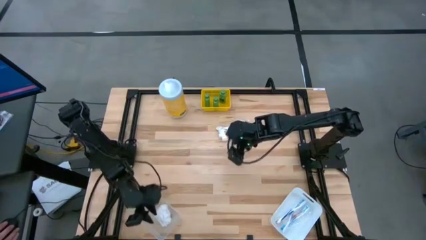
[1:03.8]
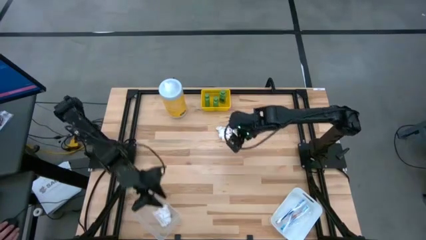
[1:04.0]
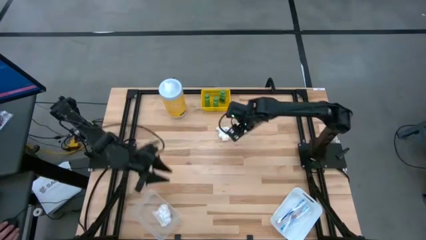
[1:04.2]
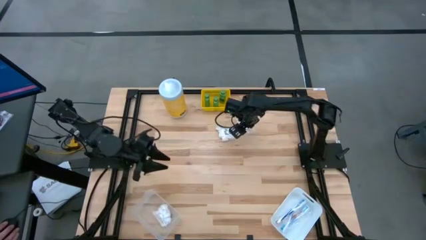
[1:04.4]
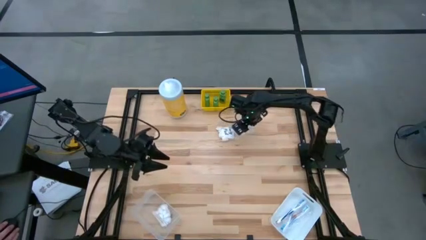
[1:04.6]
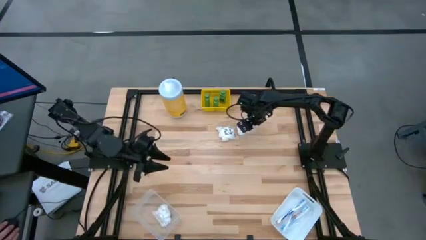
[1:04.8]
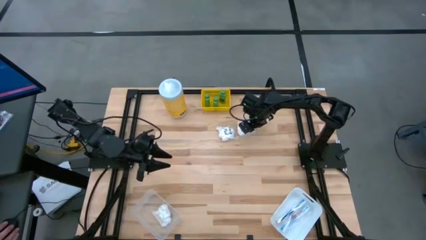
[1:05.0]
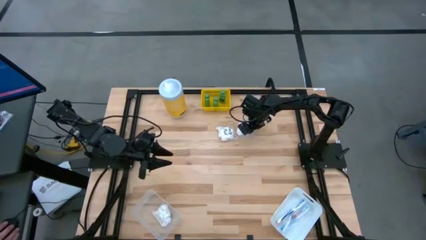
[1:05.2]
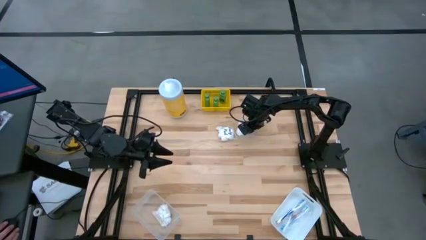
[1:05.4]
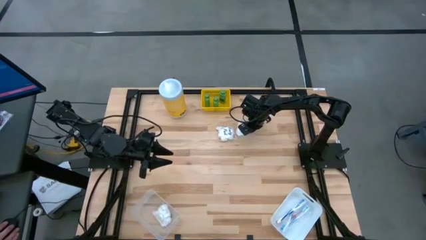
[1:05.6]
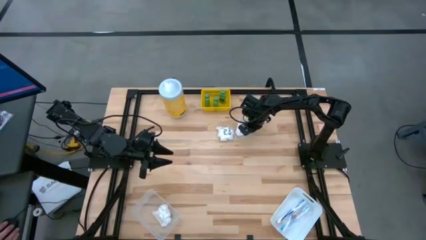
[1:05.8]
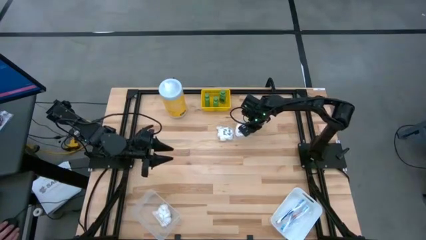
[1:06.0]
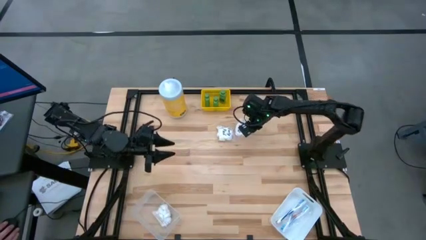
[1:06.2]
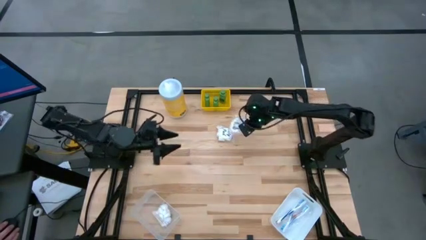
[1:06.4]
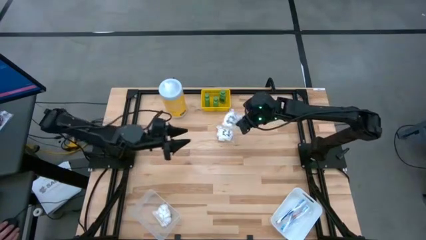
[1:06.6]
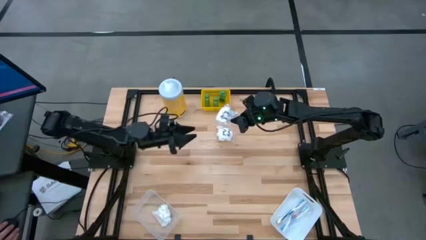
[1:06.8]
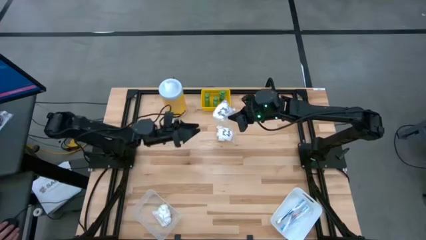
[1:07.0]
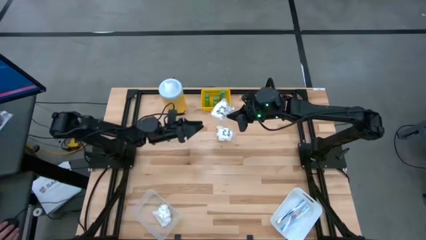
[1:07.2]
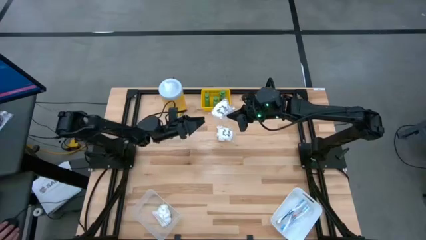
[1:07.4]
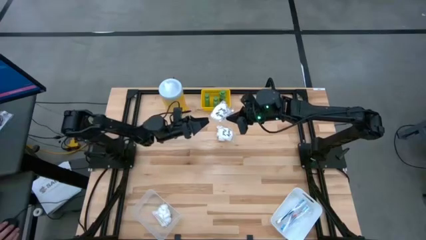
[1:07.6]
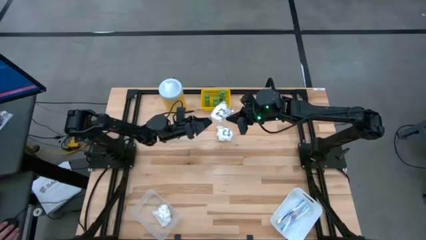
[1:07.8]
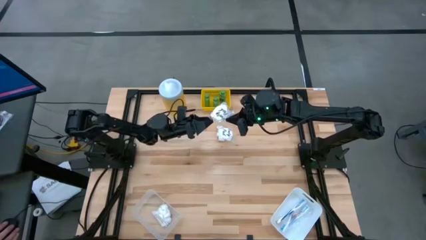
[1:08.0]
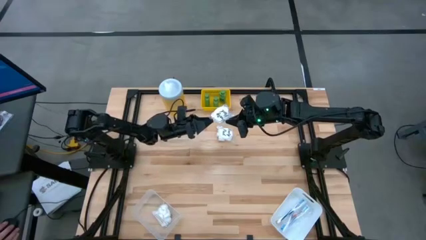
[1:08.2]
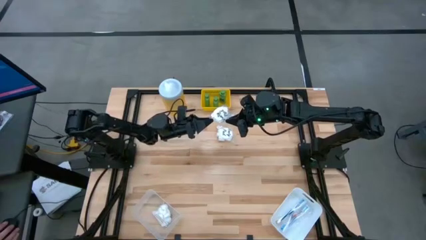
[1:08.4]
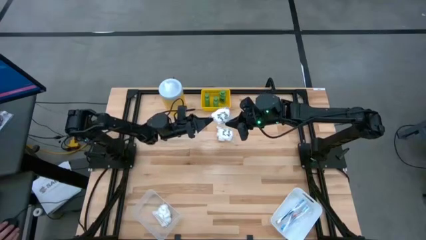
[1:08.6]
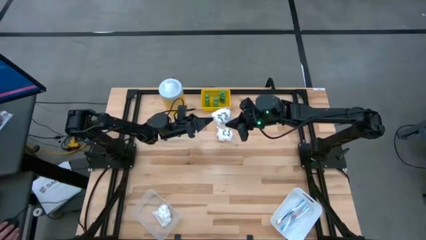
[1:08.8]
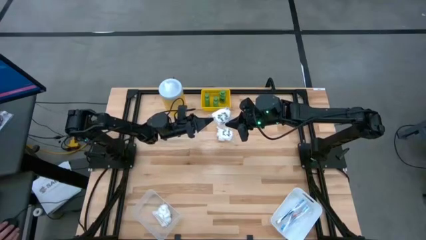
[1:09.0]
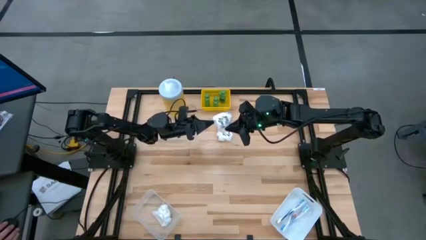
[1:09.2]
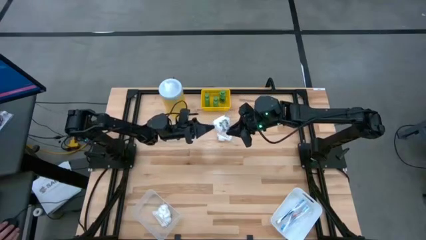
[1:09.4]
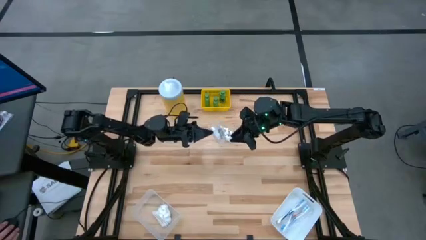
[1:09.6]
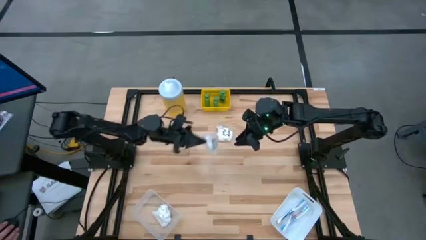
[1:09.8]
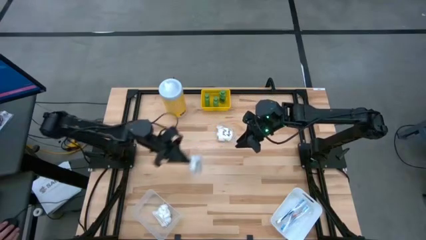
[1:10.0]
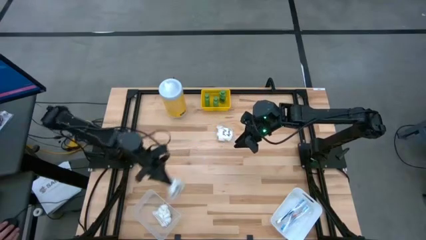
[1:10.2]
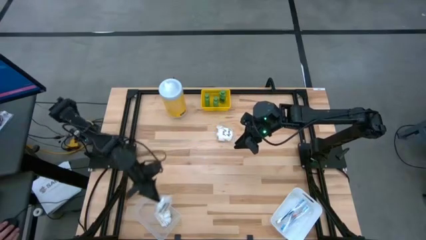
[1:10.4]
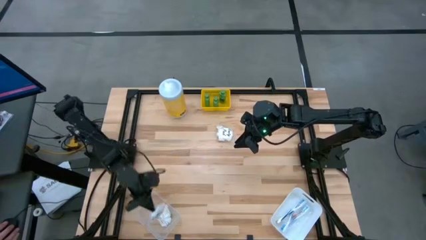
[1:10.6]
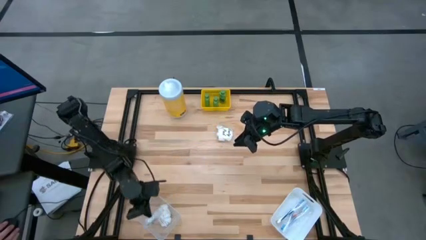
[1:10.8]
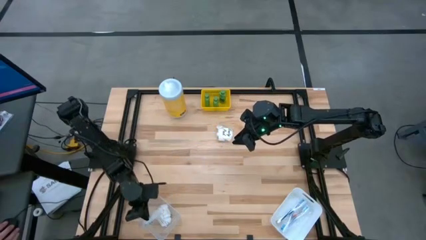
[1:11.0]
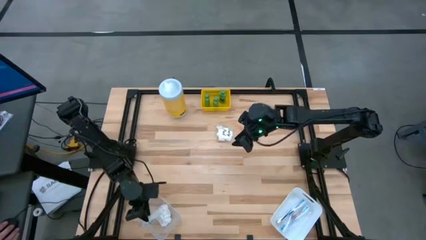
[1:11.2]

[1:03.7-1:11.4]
Task: Pick & Place Travel size toiletries
Put the right white cotton pack into the transparent bin

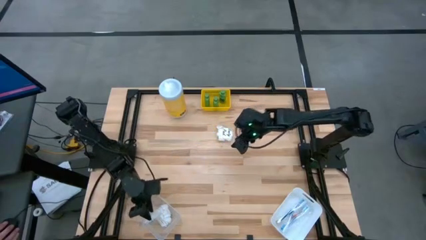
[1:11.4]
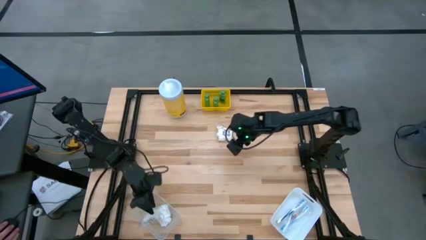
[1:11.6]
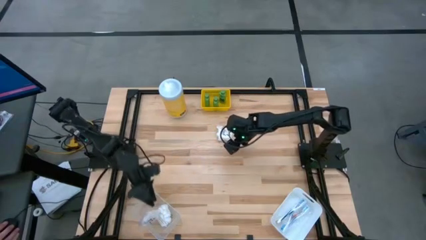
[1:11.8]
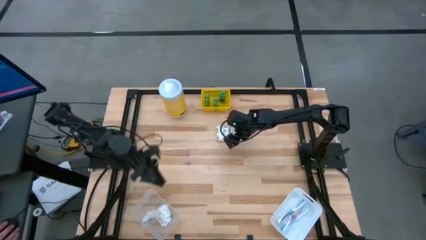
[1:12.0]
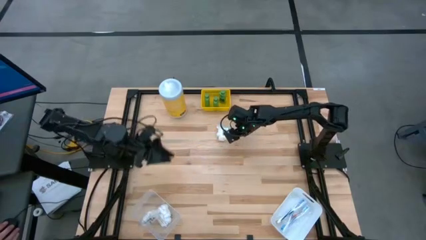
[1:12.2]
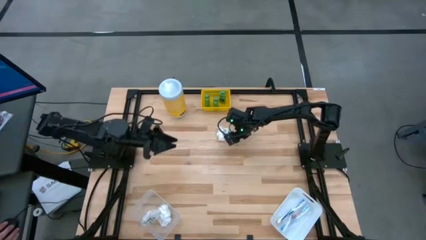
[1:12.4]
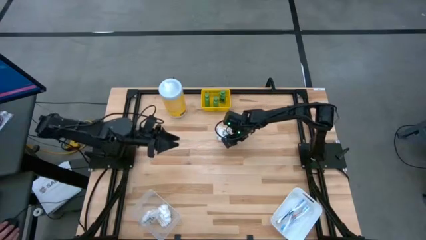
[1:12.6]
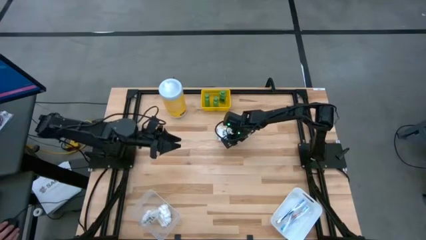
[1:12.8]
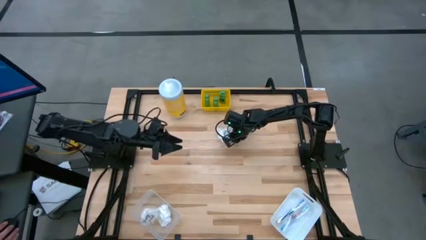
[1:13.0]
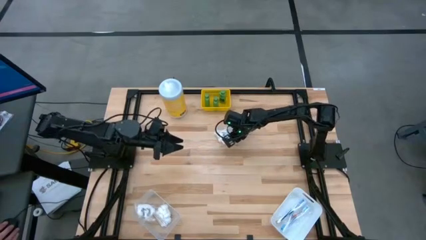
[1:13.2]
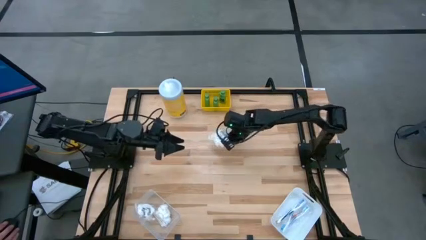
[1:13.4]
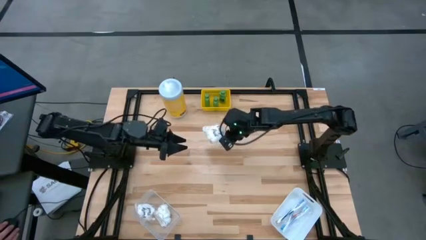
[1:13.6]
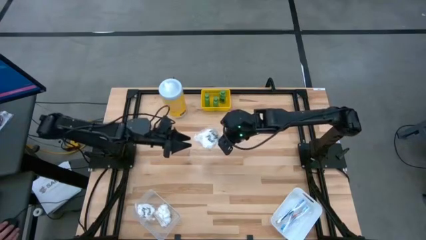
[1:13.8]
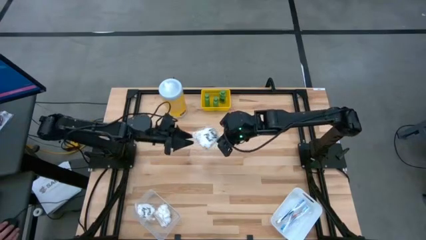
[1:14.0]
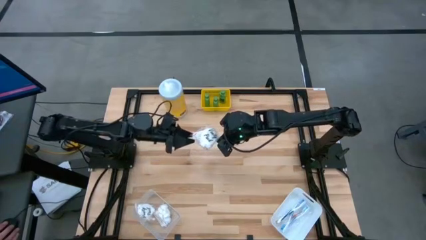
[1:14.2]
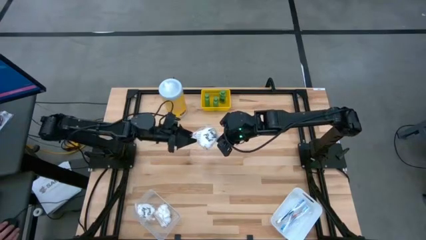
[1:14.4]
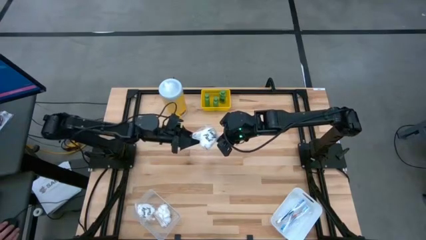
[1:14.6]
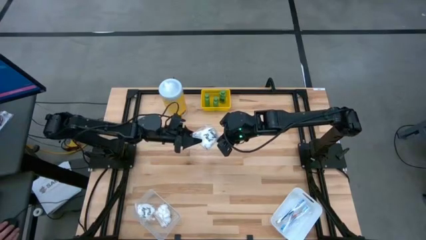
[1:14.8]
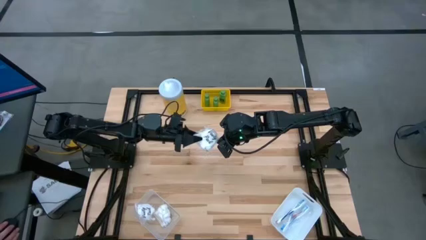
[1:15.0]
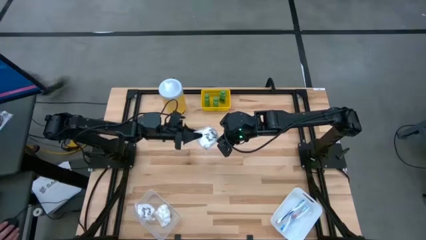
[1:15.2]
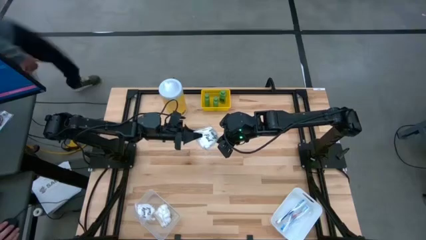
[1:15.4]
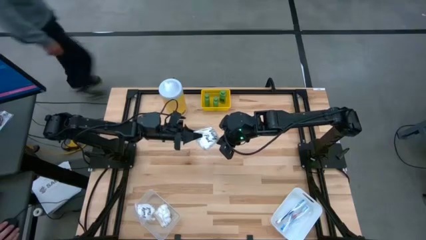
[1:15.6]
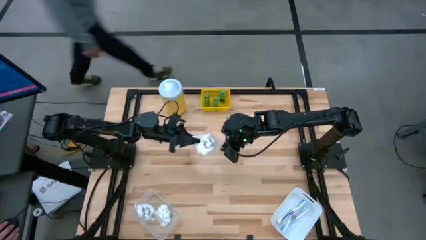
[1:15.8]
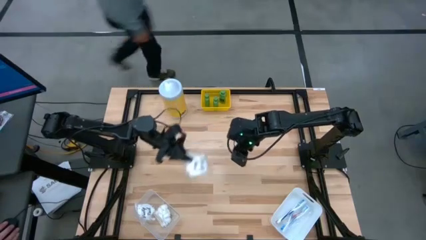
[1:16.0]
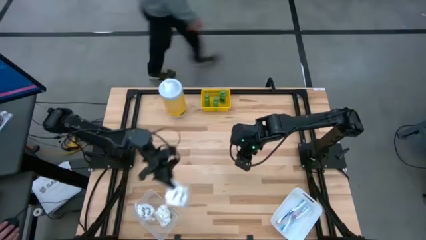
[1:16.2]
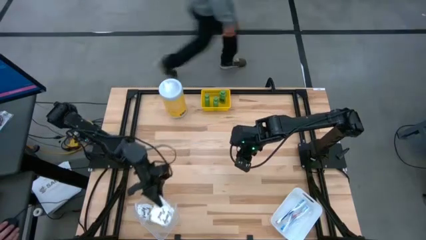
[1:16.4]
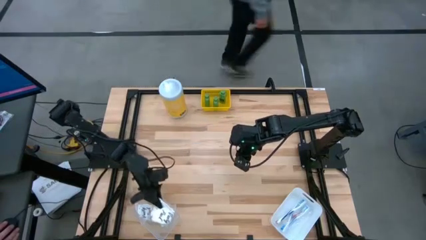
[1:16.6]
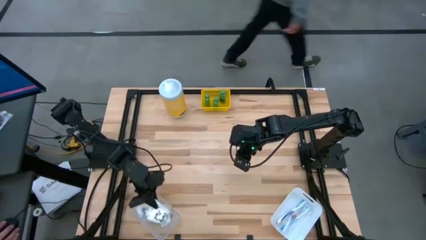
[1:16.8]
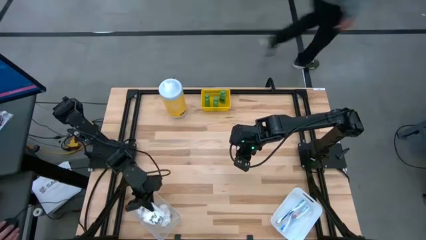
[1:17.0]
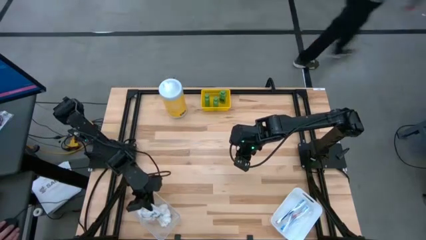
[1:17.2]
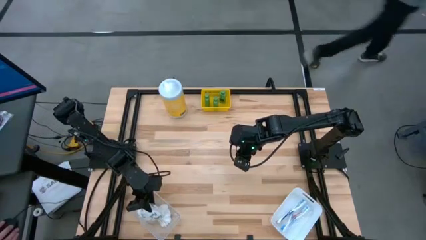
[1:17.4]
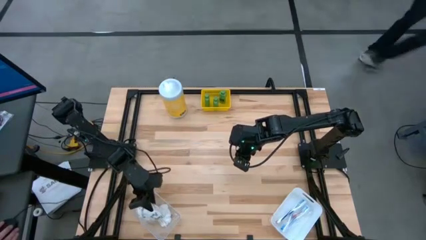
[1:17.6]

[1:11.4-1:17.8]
Put the white cotton pack into the transparent bin

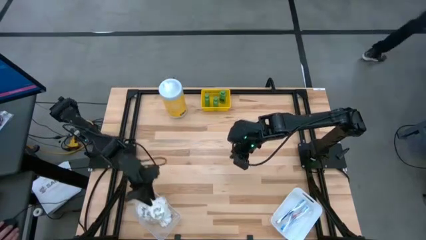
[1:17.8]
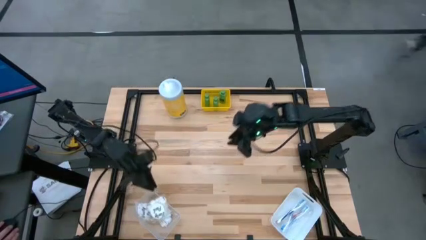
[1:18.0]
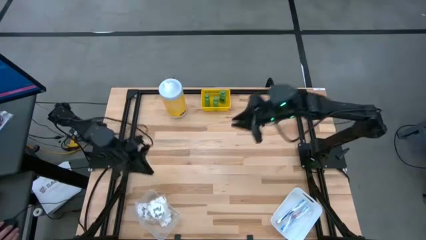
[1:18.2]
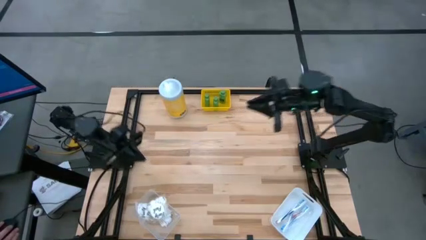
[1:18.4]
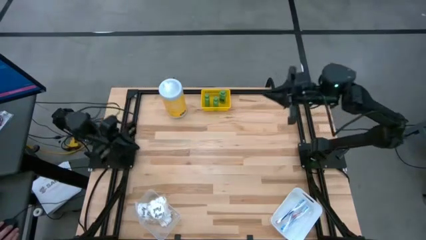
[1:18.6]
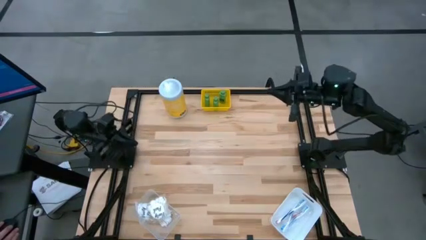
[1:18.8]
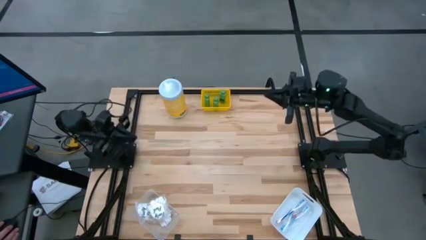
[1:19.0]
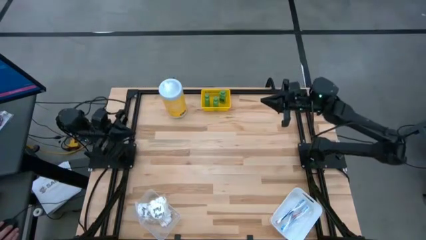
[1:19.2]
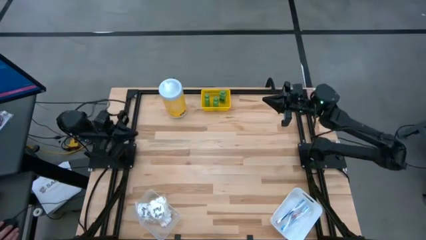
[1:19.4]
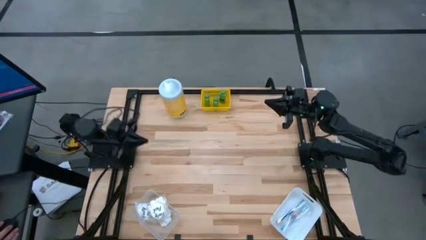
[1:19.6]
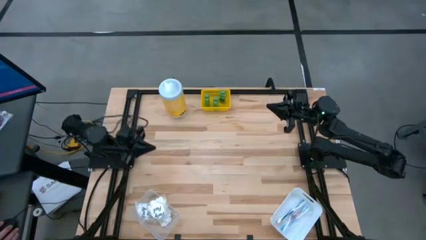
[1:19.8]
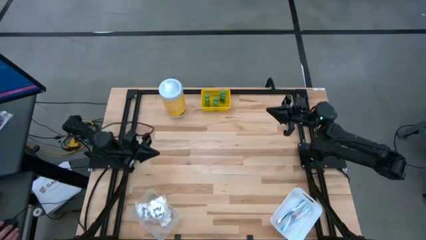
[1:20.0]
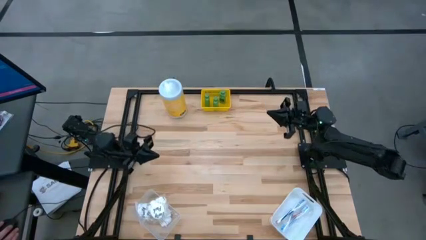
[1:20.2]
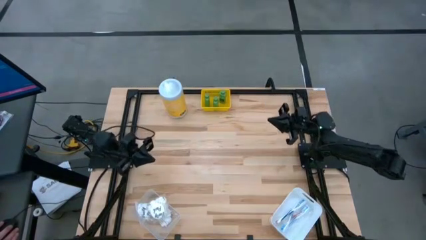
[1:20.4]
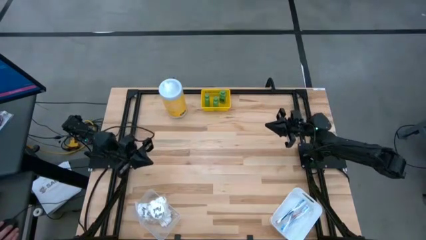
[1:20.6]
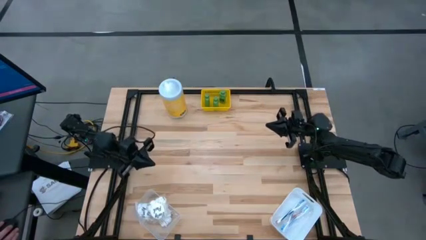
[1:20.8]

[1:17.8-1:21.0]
Return to Home Position
